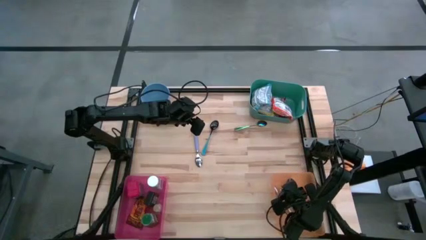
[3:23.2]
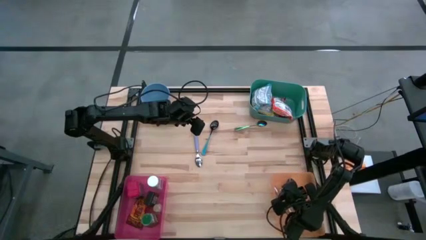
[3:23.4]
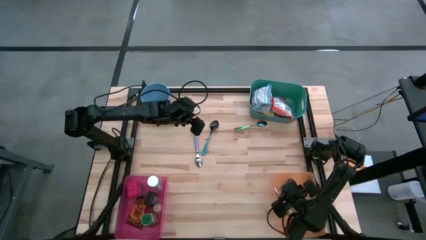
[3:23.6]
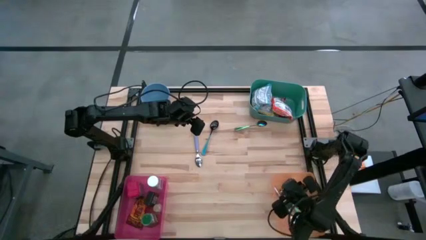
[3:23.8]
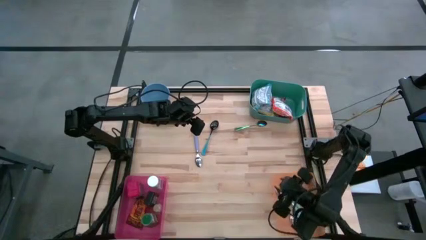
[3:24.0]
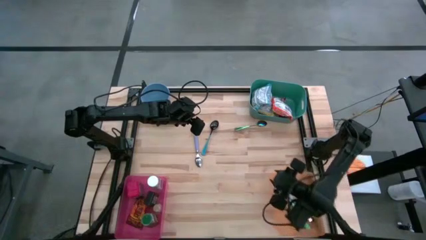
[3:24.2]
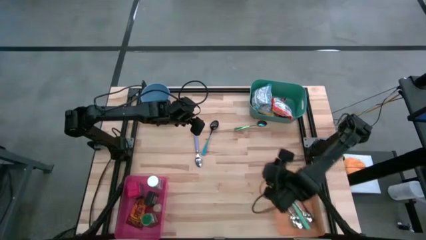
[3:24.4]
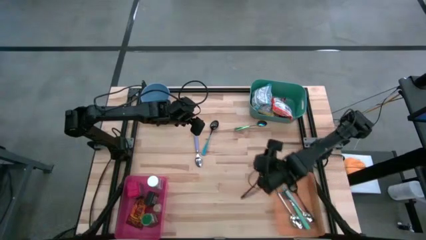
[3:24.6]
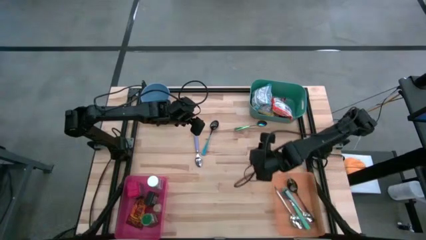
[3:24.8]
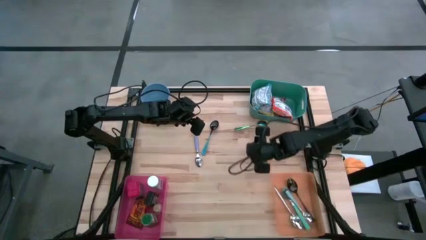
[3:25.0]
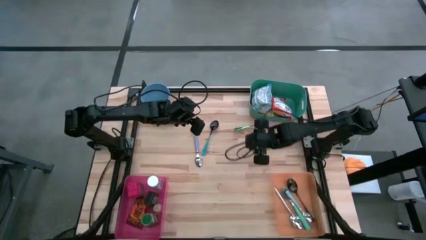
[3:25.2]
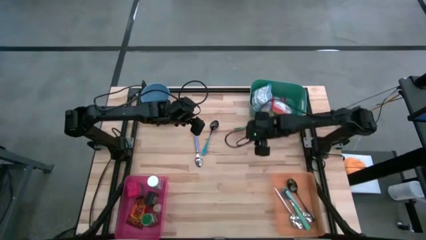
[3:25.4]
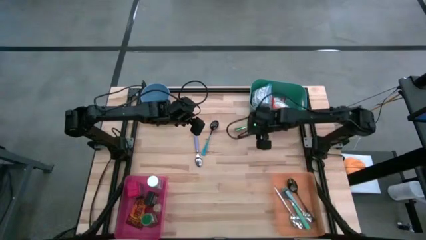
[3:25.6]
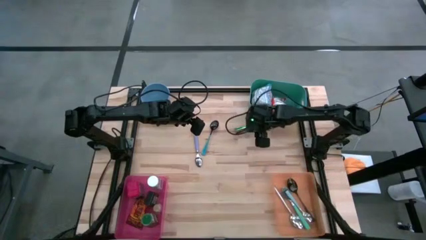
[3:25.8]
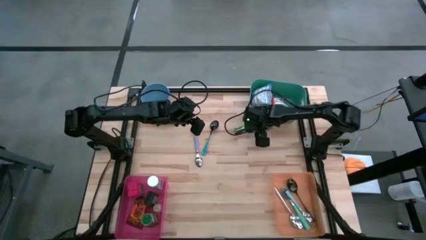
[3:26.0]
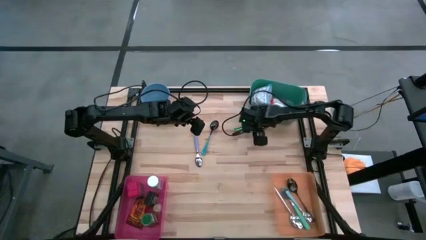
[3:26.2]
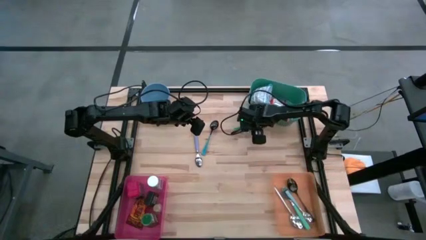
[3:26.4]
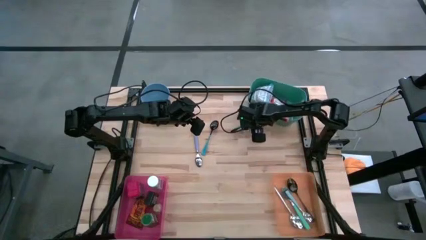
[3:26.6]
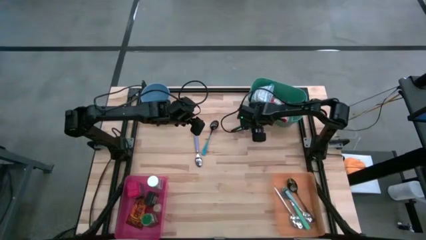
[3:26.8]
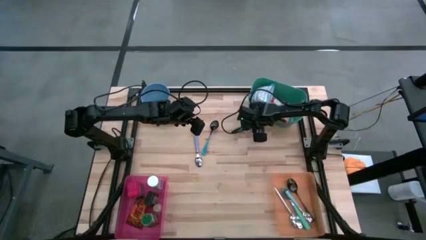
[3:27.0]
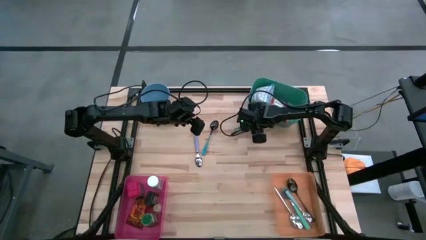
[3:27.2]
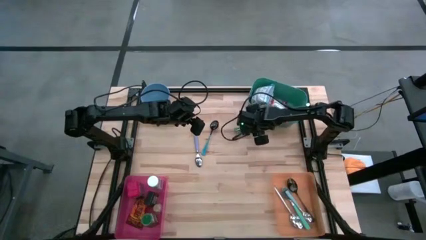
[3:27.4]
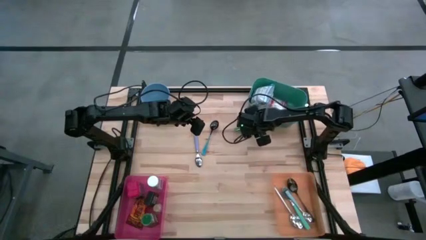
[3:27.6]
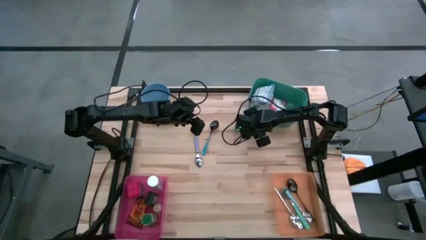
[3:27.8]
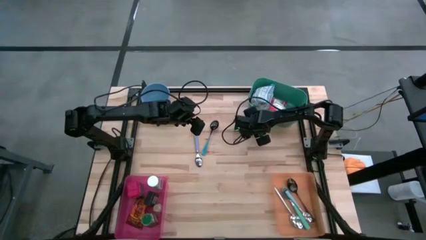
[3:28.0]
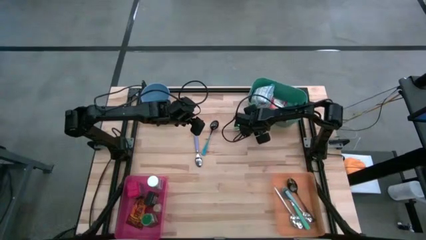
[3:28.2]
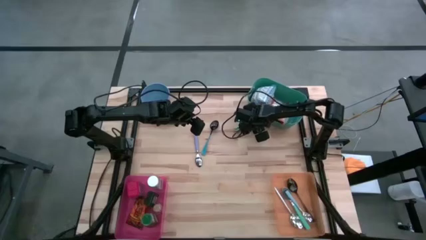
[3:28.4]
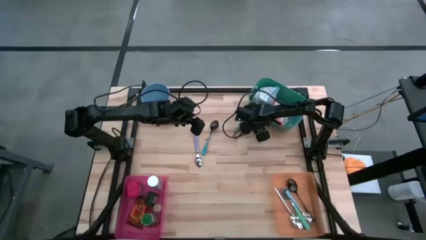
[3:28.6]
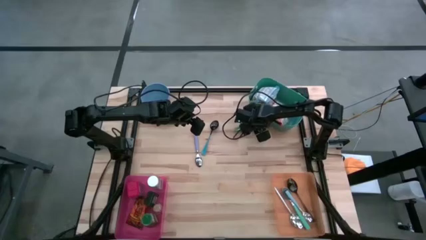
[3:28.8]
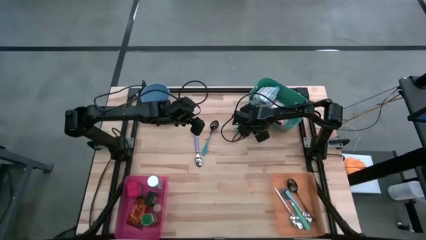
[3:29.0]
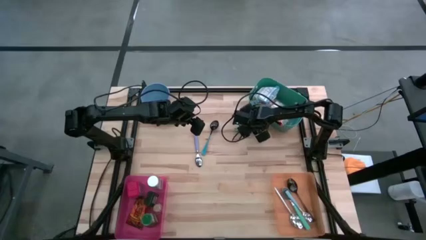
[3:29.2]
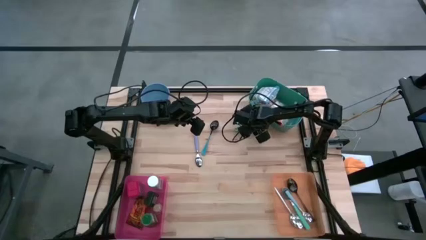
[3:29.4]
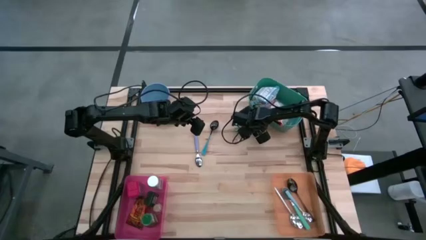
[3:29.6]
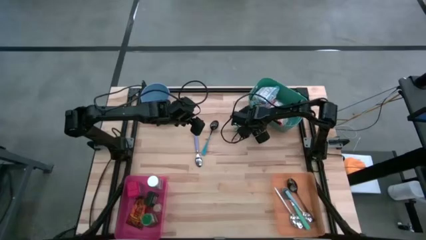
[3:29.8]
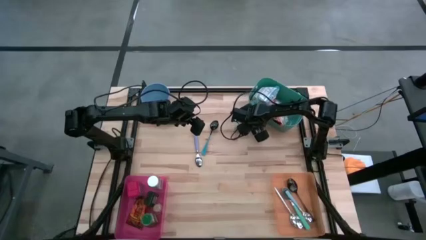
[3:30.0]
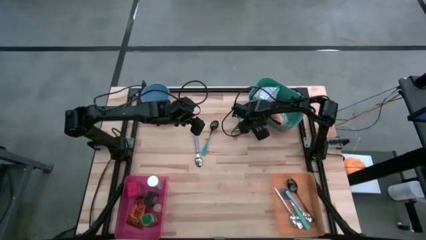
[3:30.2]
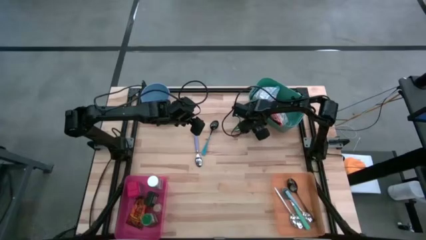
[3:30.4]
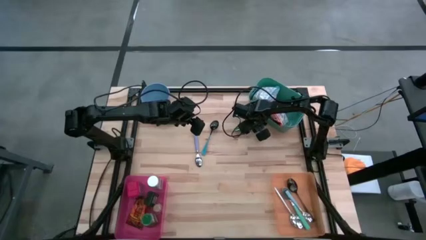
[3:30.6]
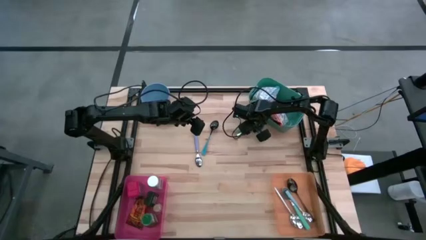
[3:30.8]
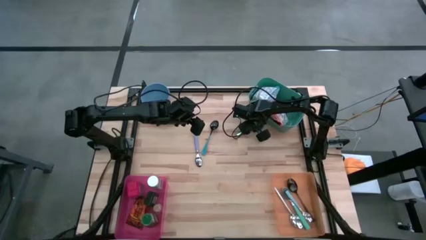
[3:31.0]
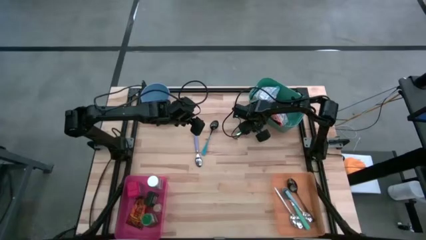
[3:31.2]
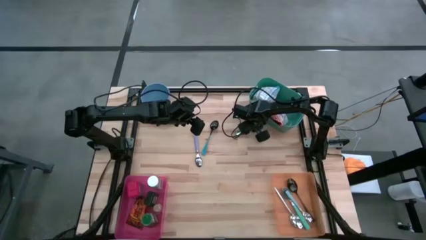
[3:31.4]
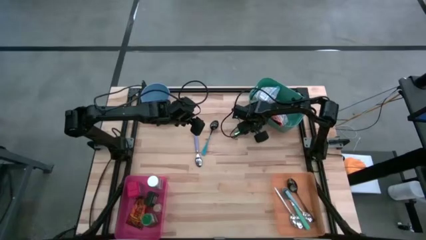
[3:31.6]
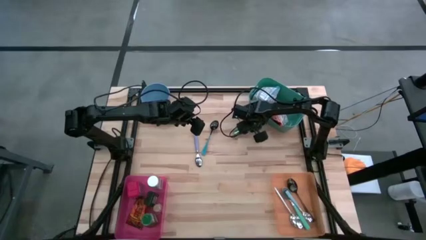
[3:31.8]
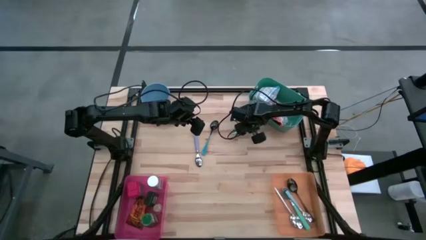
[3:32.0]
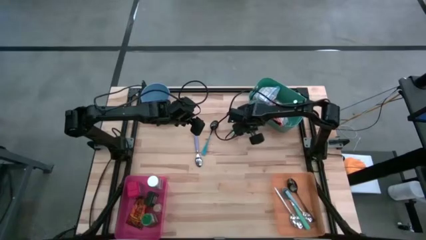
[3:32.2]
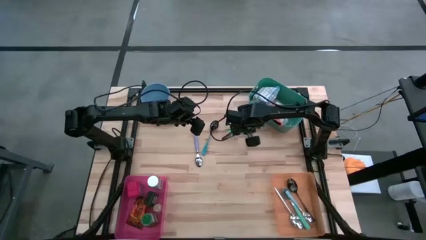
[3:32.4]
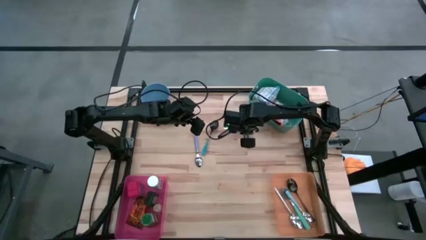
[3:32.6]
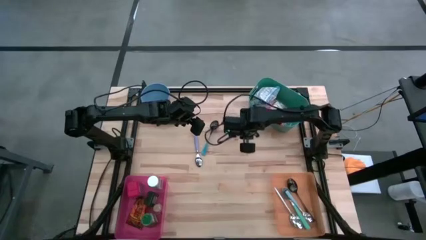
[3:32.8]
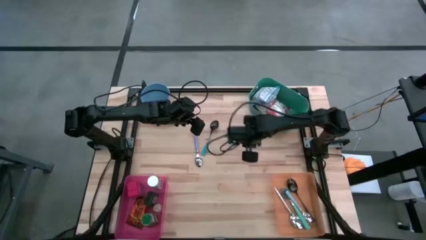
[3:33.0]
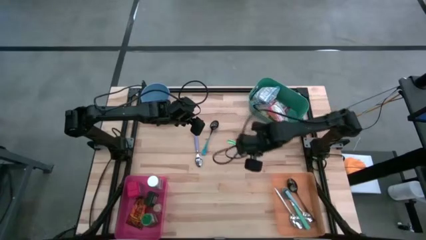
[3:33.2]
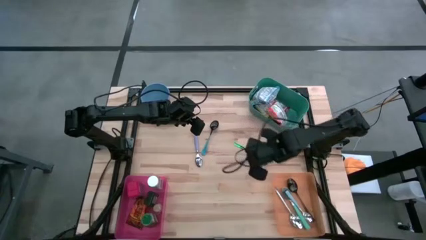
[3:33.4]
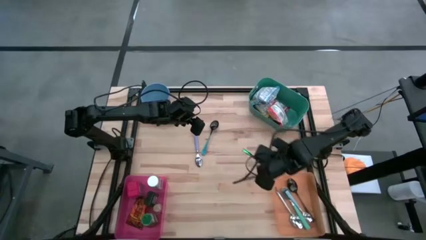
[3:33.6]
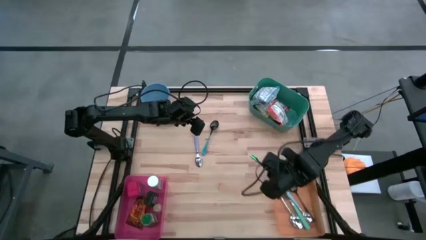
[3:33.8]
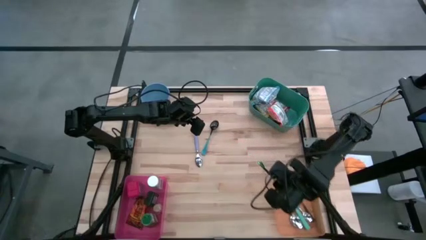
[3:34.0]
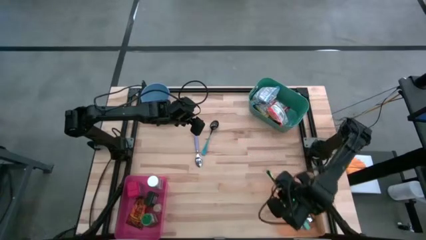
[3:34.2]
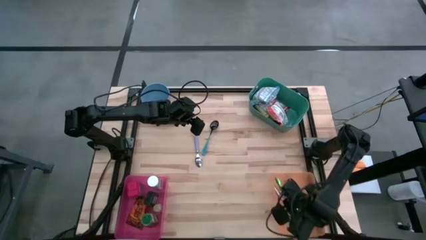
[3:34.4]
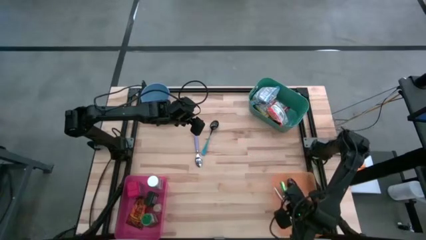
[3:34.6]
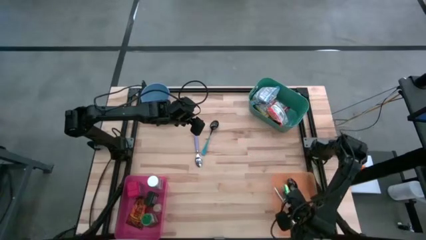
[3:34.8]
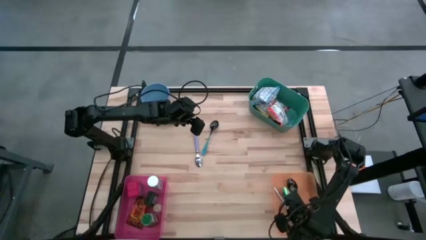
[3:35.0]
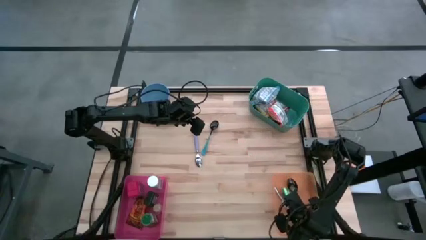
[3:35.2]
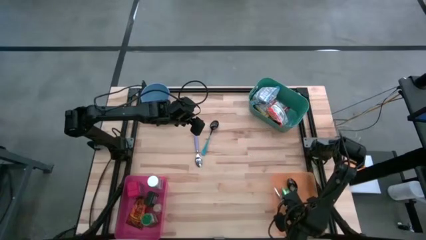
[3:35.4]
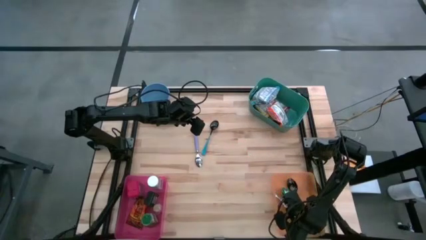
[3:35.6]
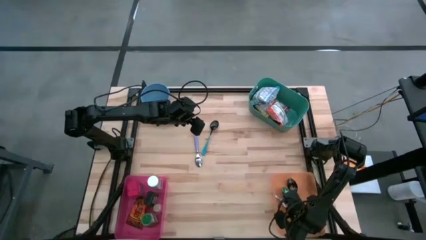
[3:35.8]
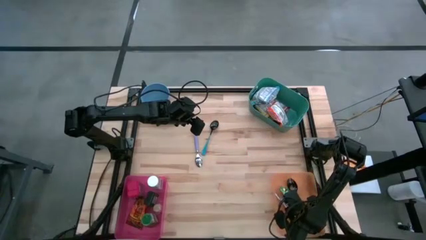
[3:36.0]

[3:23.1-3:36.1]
Put the green spoon into the orange bin
